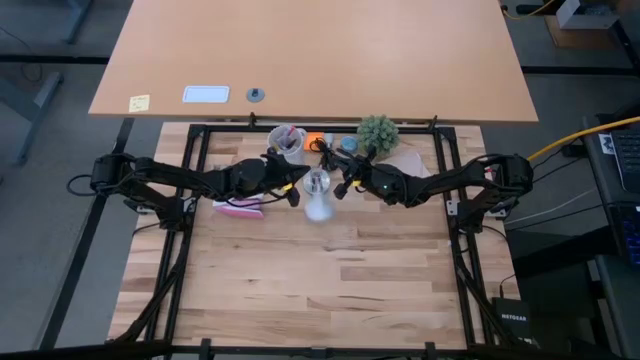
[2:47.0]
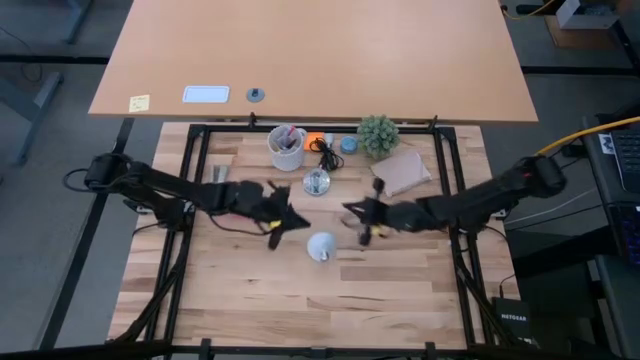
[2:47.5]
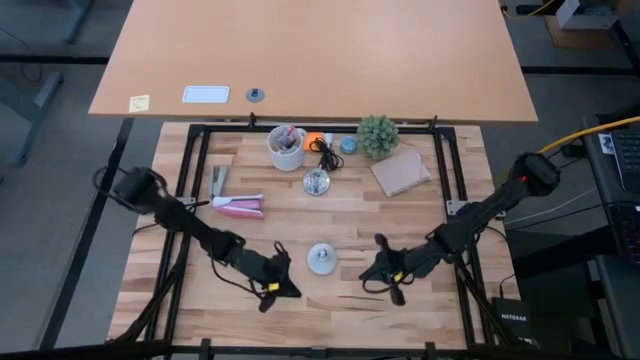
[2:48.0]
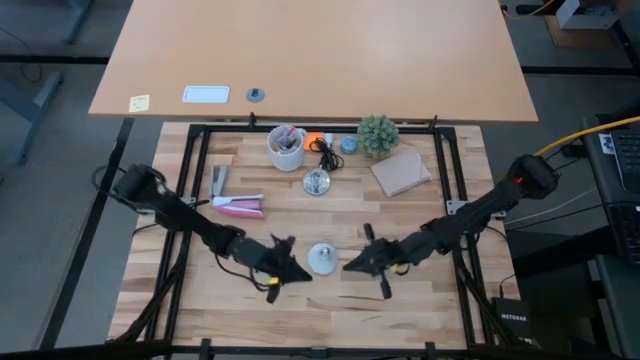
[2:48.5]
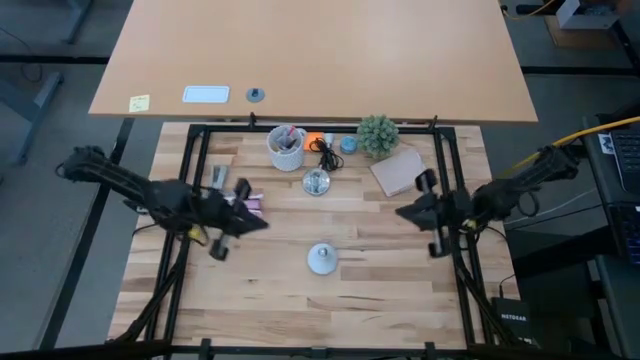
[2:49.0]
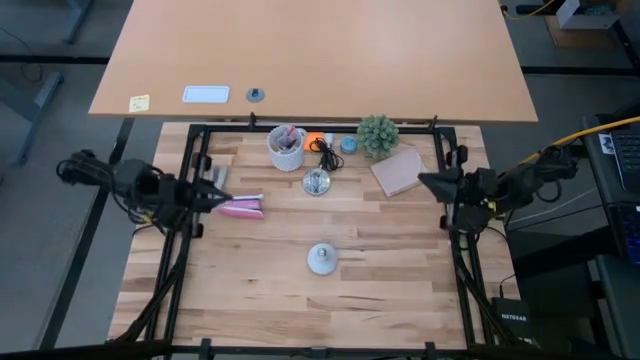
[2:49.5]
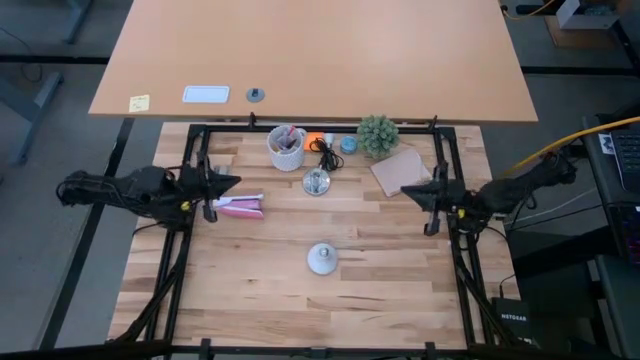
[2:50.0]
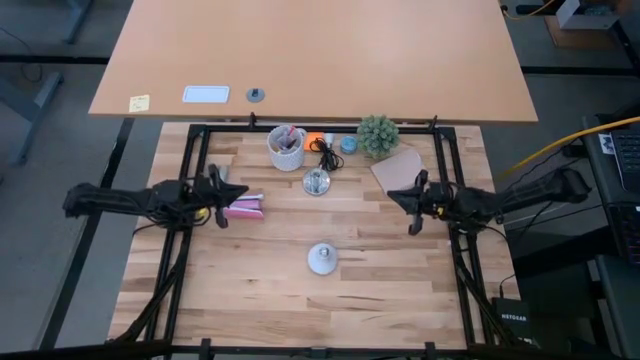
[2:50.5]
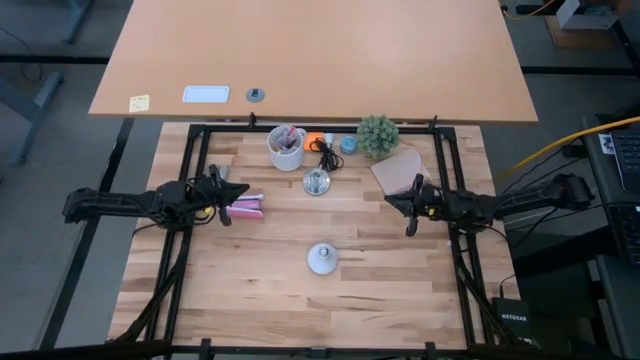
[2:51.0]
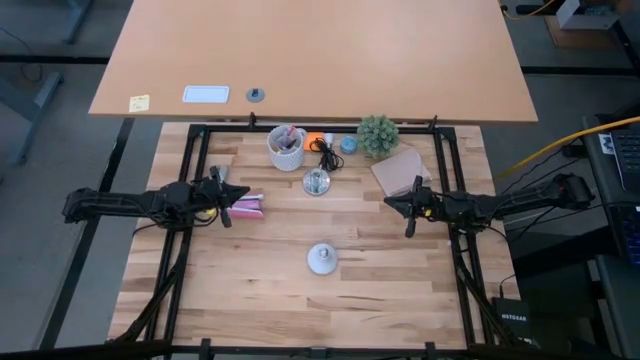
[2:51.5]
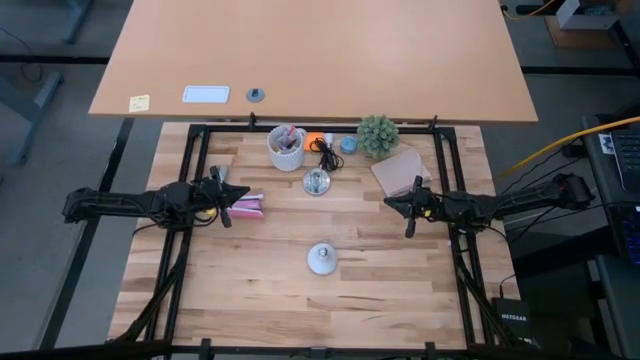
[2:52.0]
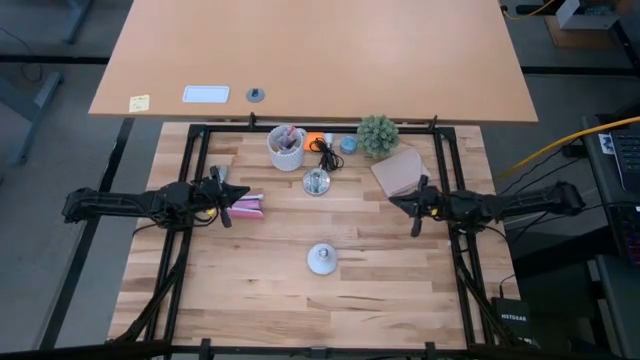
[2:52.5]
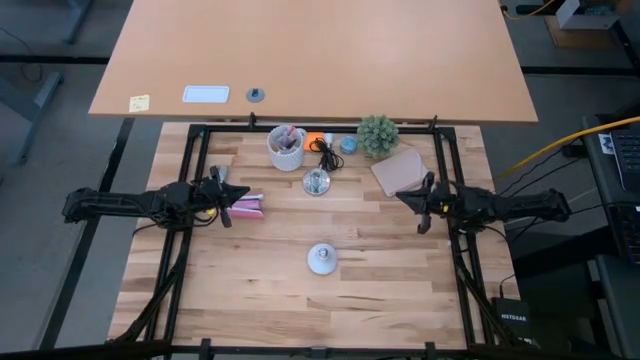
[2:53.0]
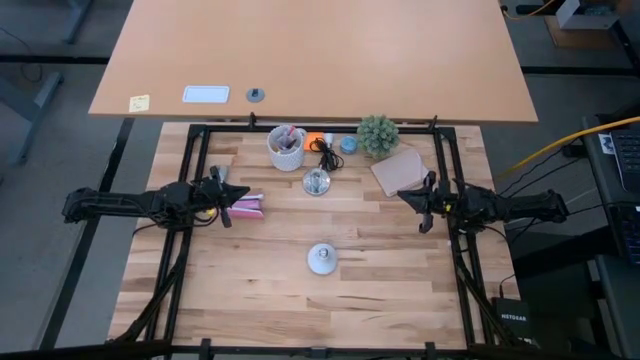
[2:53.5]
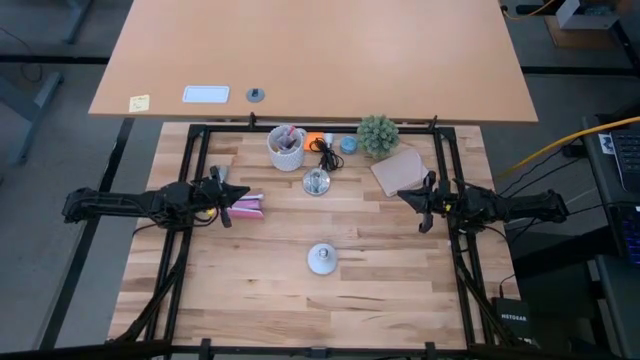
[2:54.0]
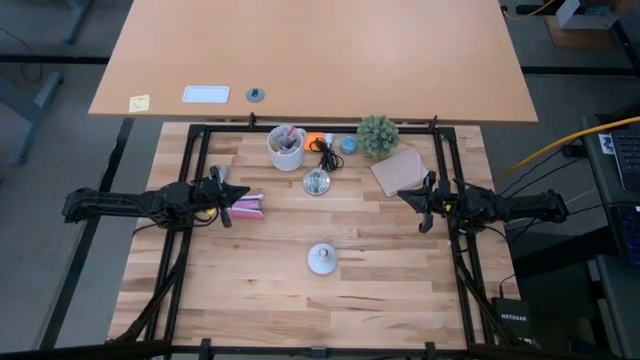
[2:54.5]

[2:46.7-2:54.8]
Task: Screw lightbulb
Return to Home Position

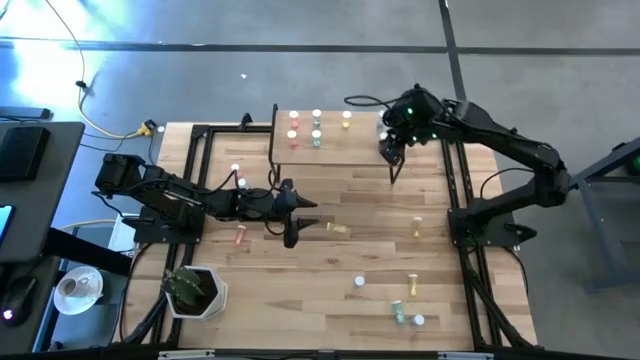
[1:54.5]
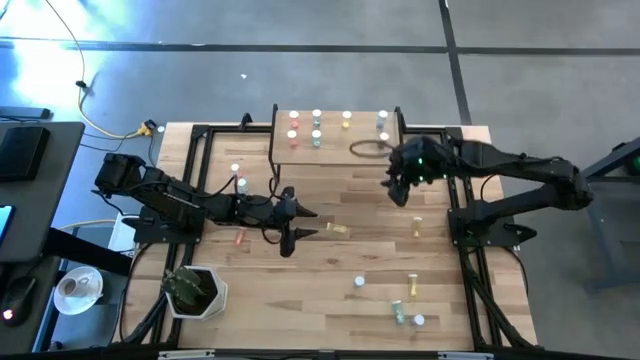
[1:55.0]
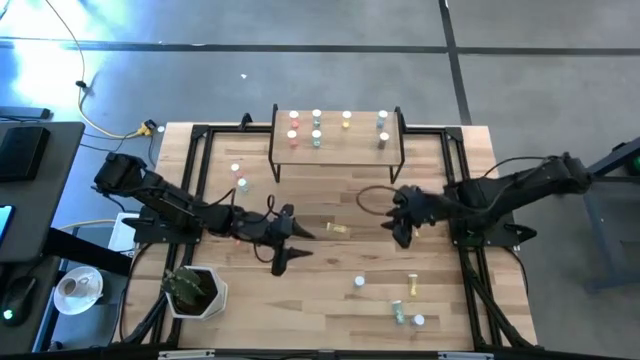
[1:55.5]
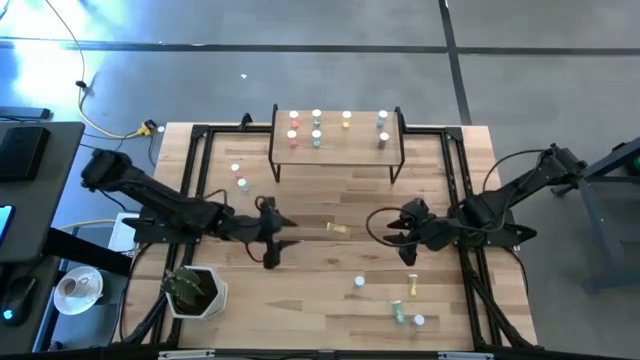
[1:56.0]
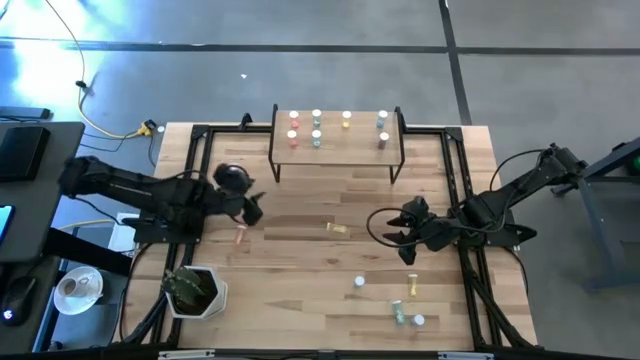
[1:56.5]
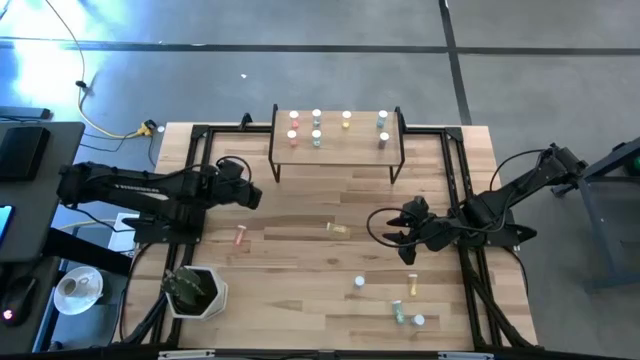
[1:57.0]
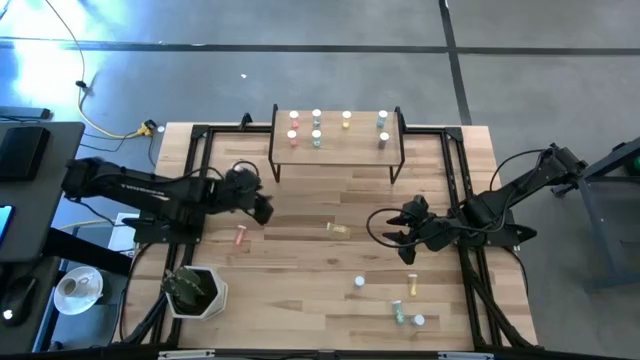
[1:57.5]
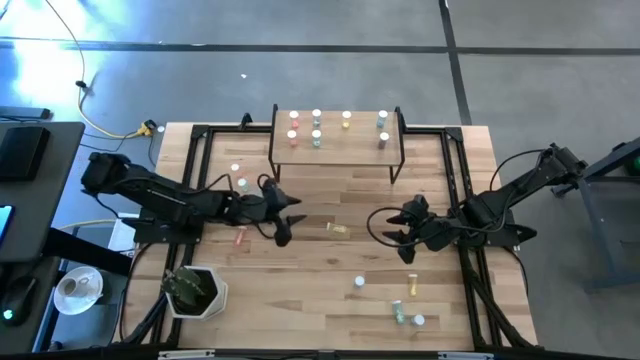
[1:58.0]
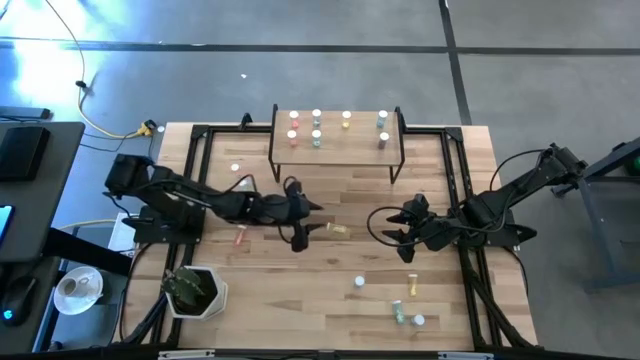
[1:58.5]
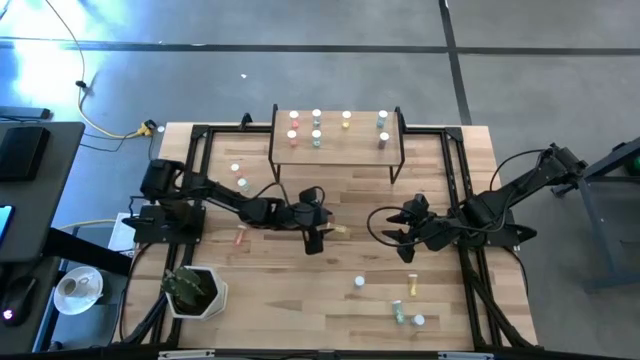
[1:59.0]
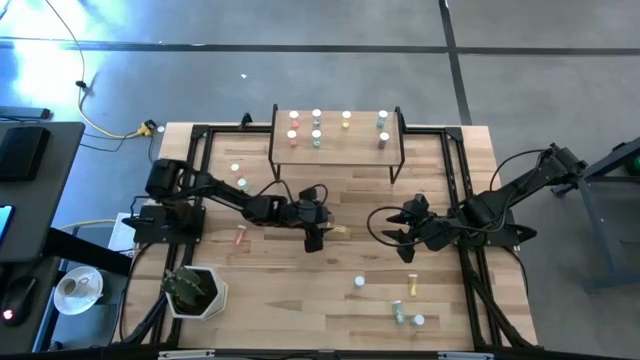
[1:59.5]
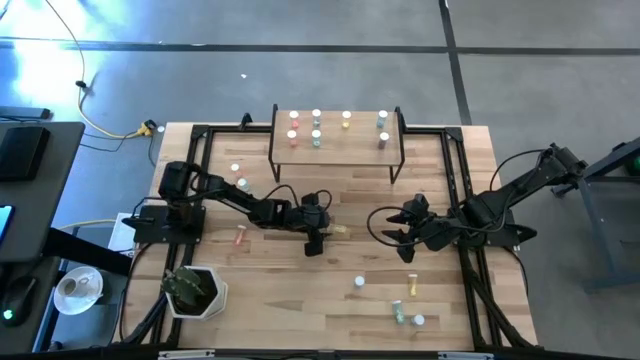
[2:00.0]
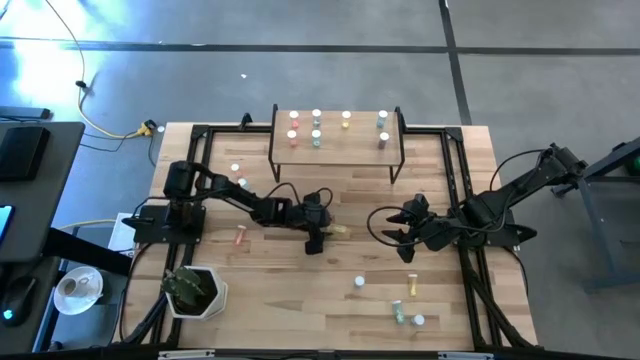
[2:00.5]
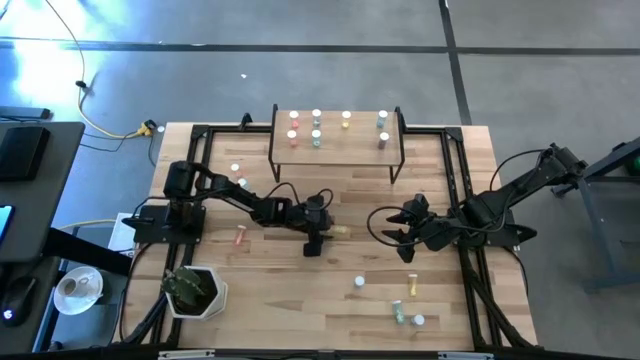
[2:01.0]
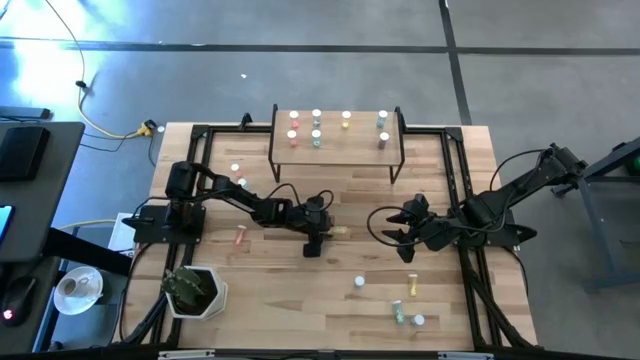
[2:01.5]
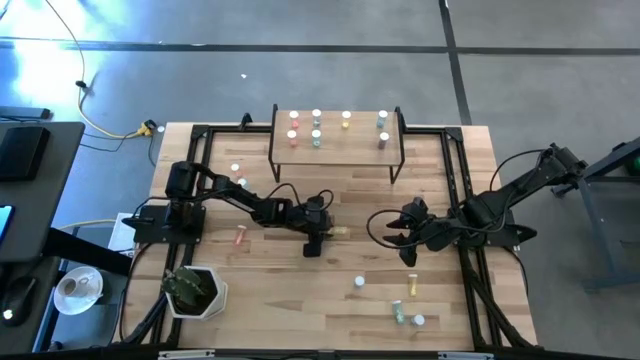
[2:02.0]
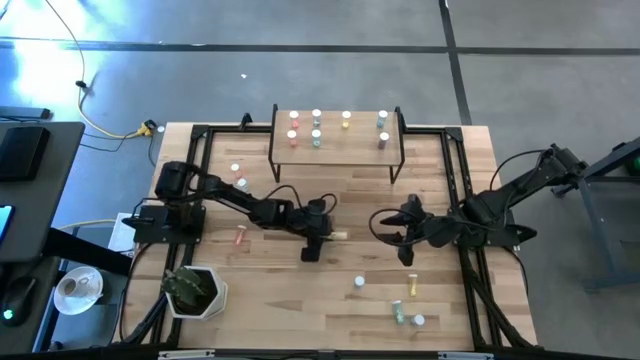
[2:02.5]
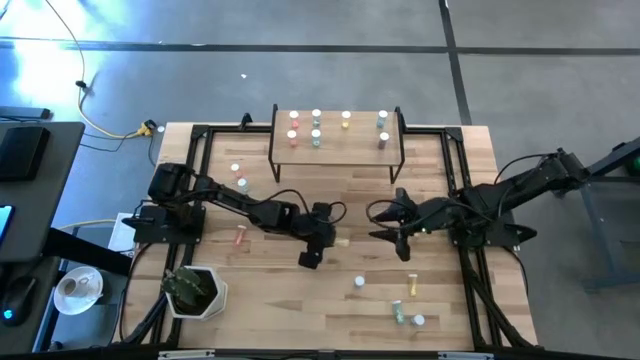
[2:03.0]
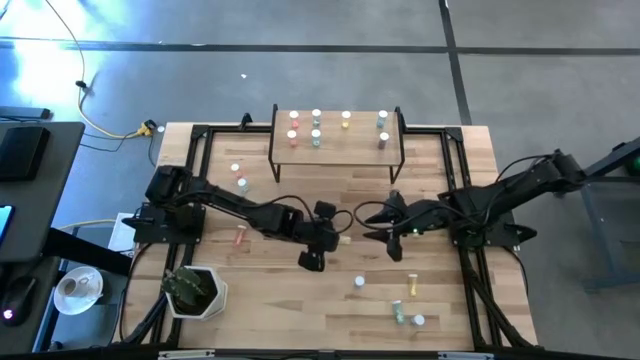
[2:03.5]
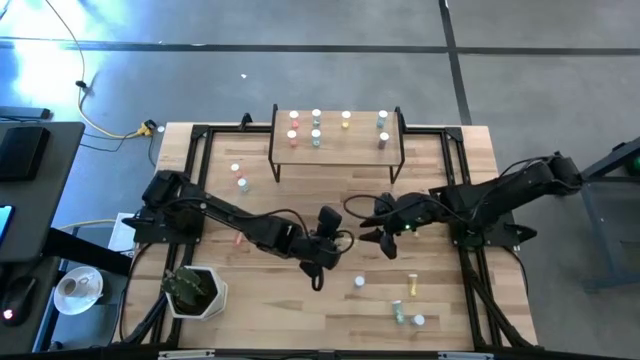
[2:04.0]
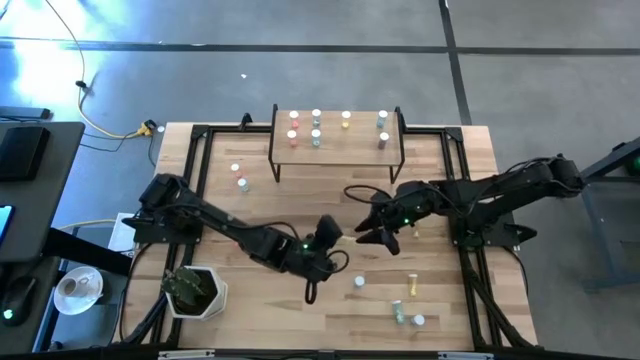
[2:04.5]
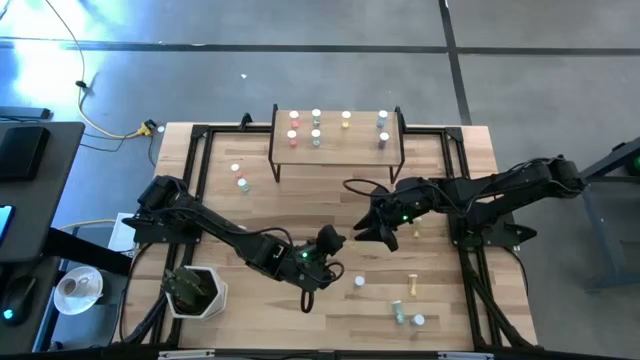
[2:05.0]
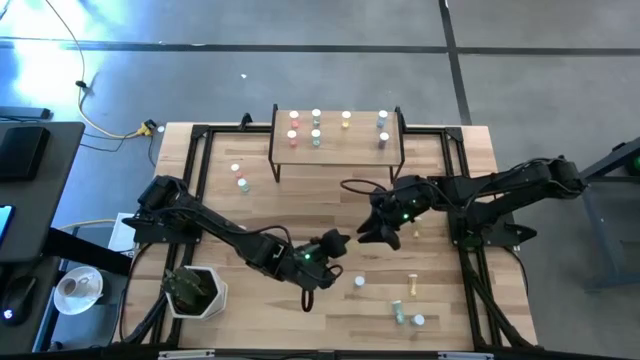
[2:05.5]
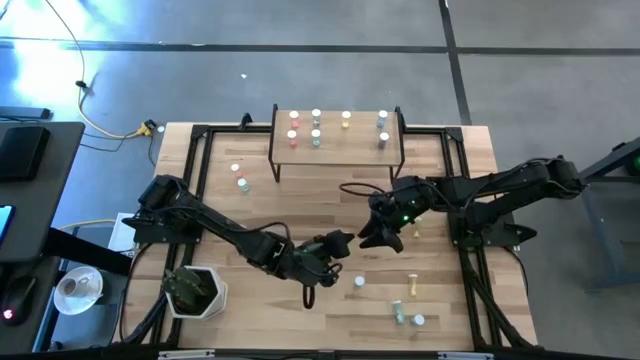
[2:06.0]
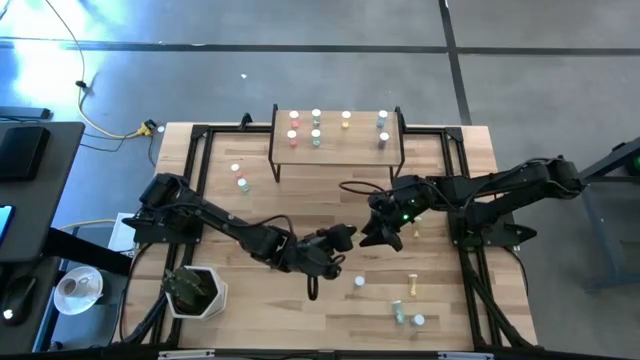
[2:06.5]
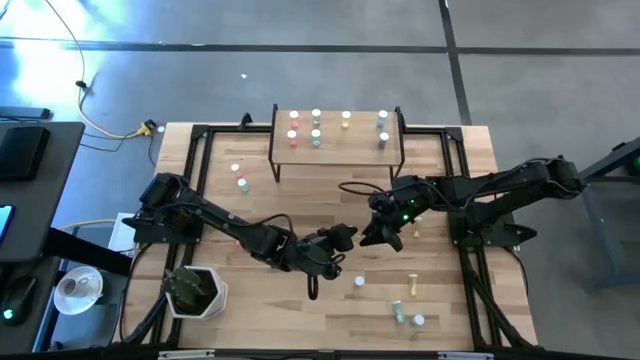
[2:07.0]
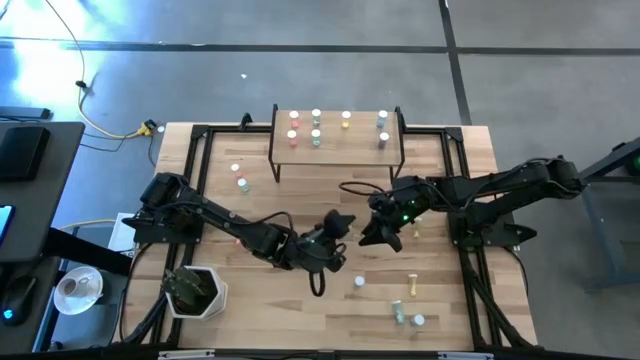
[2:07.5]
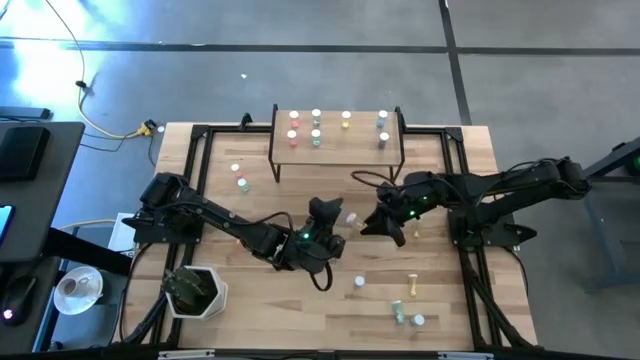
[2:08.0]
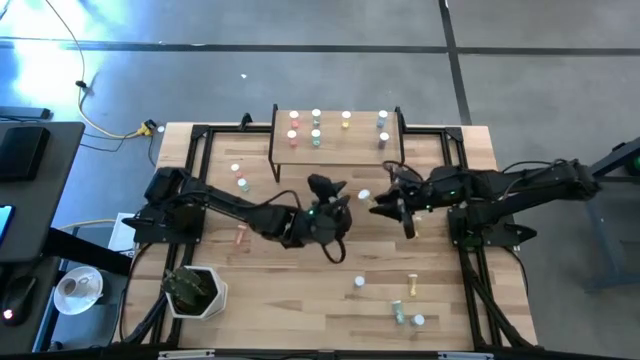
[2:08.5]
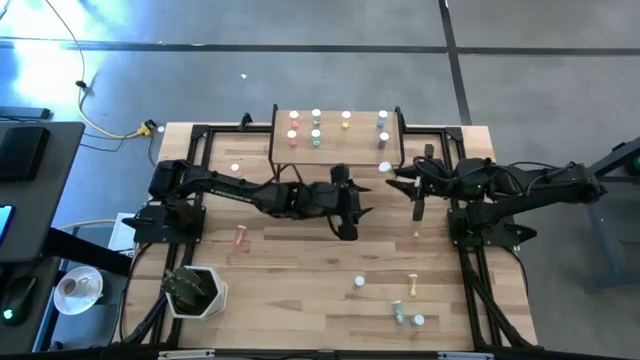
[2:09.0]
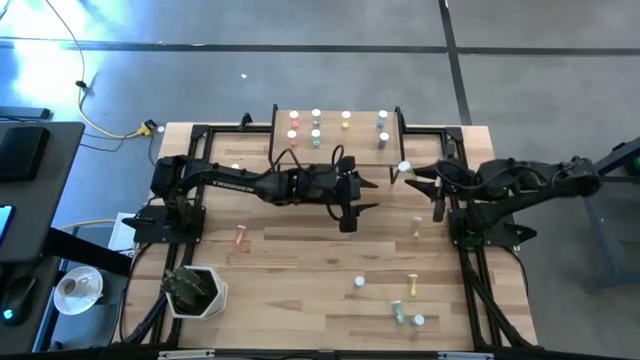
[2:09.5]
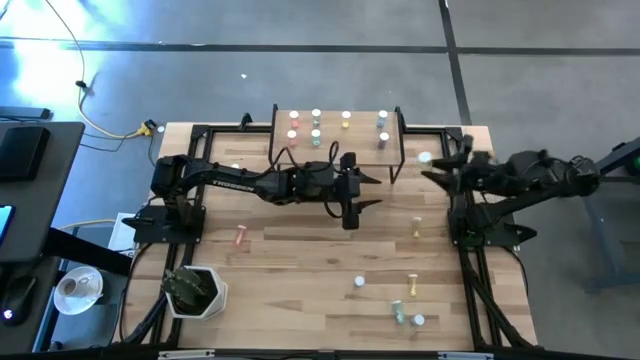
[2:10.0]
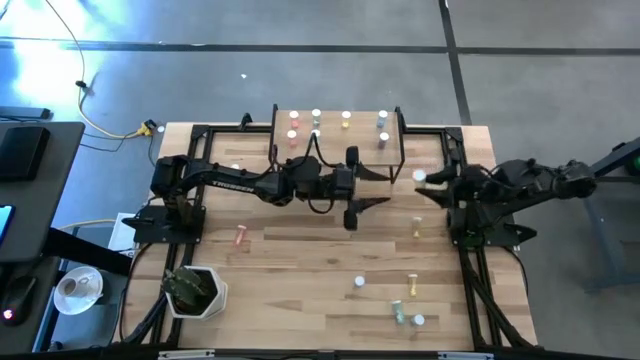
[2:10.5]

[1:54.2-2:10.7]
Task: Pick and place medicine bottles onto shelf by color
Put the yellow medicine bottle on the shelf
